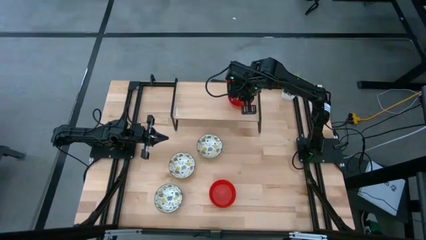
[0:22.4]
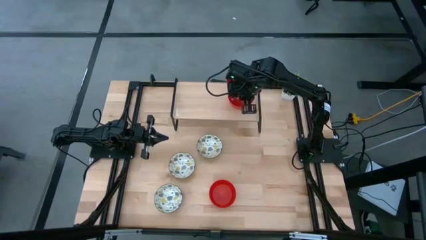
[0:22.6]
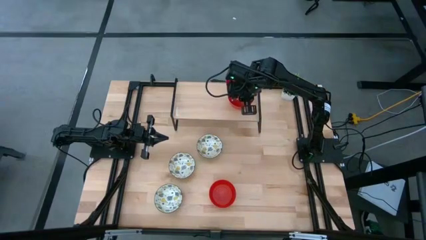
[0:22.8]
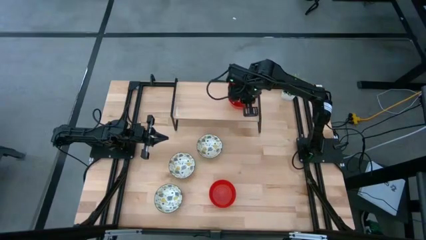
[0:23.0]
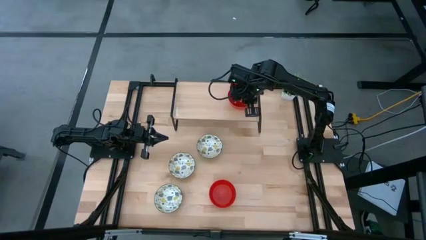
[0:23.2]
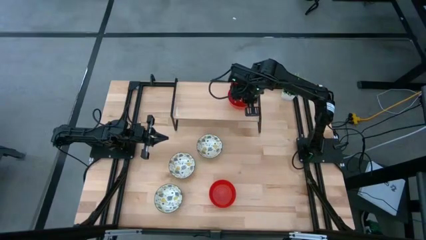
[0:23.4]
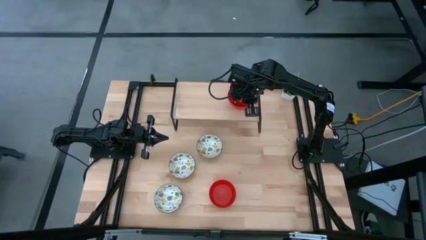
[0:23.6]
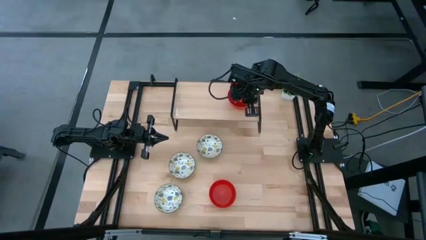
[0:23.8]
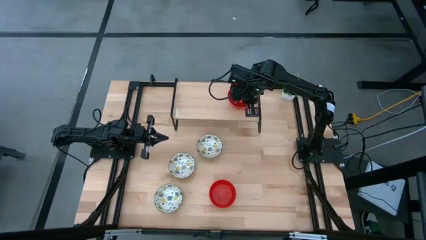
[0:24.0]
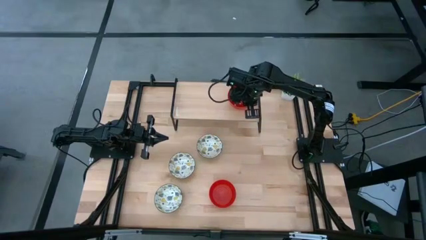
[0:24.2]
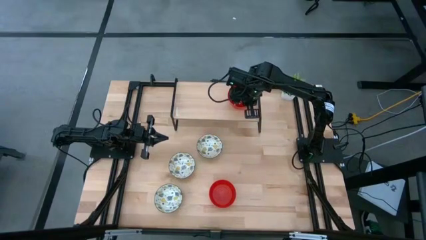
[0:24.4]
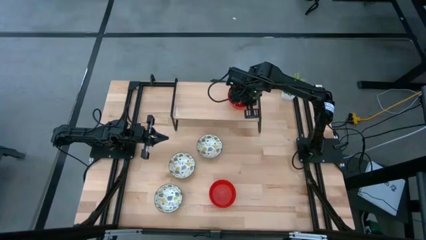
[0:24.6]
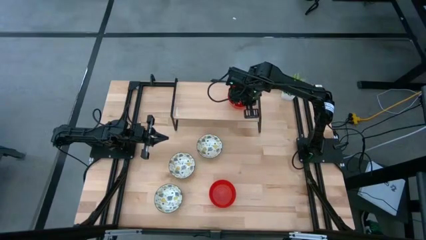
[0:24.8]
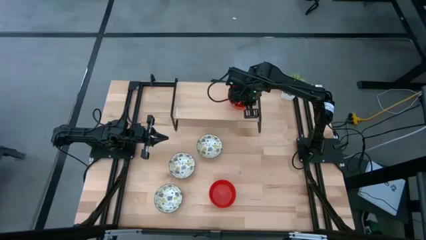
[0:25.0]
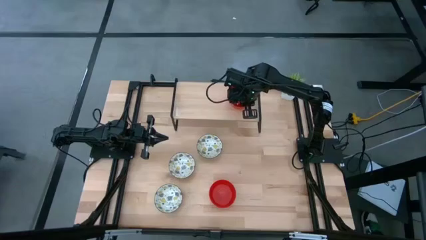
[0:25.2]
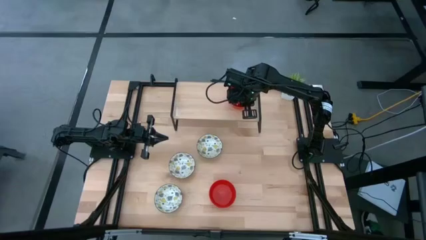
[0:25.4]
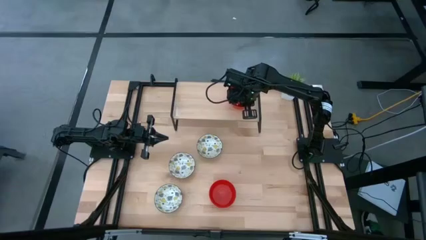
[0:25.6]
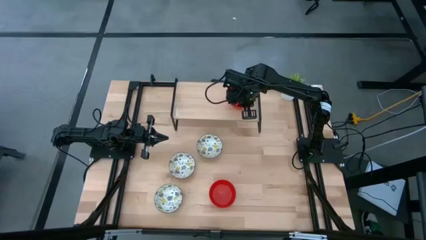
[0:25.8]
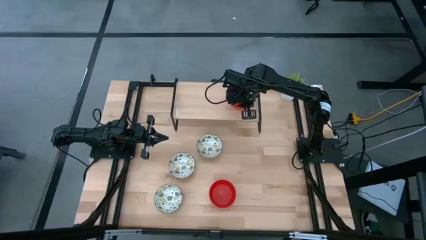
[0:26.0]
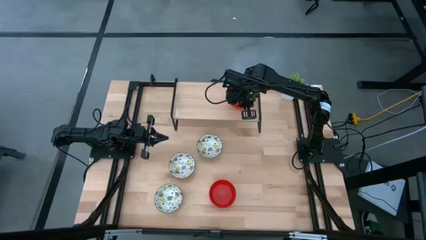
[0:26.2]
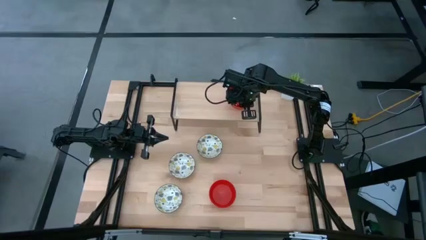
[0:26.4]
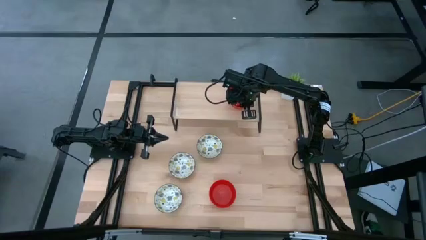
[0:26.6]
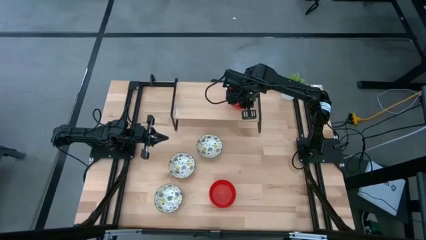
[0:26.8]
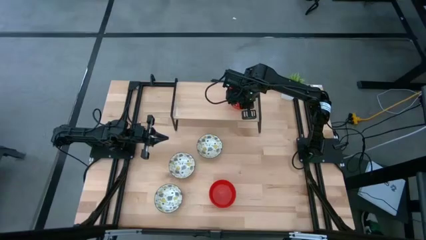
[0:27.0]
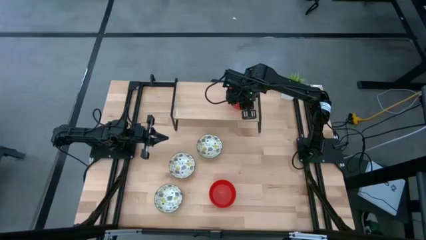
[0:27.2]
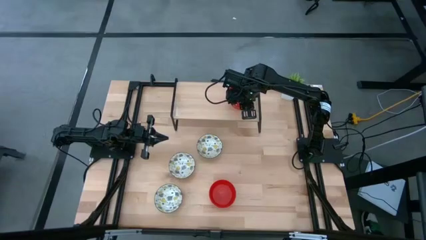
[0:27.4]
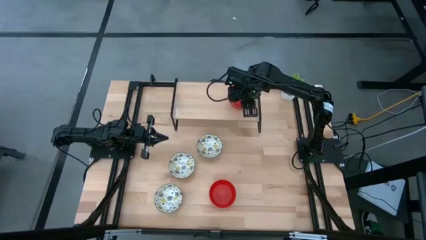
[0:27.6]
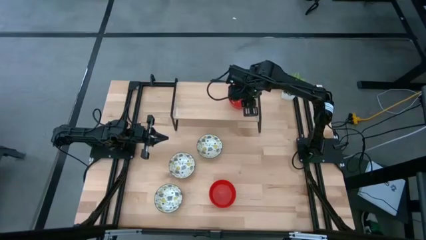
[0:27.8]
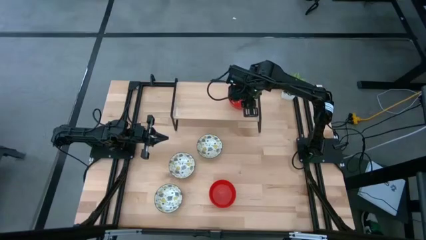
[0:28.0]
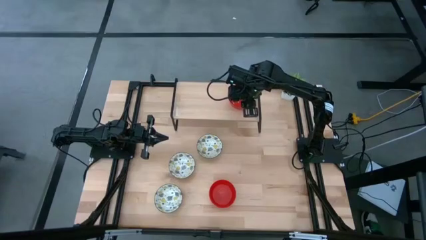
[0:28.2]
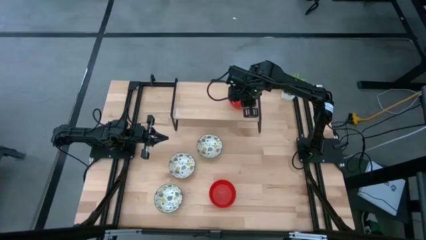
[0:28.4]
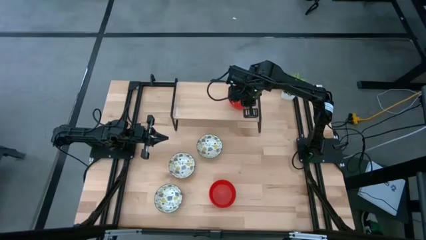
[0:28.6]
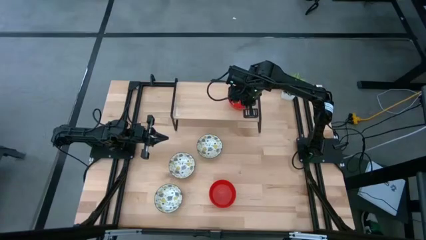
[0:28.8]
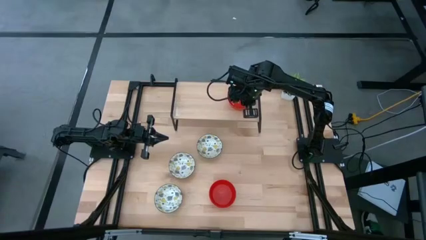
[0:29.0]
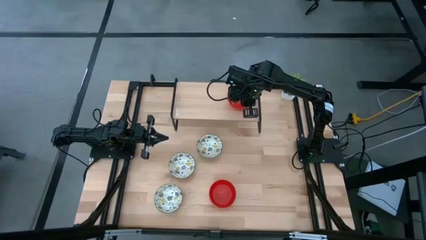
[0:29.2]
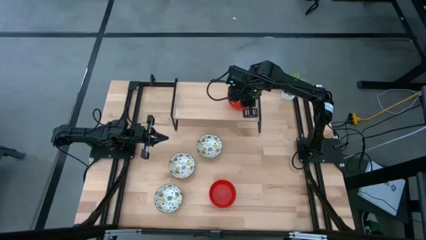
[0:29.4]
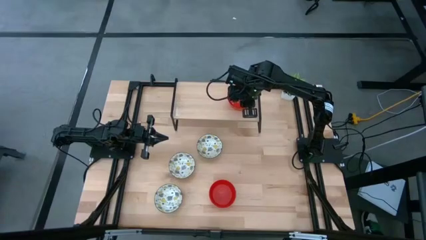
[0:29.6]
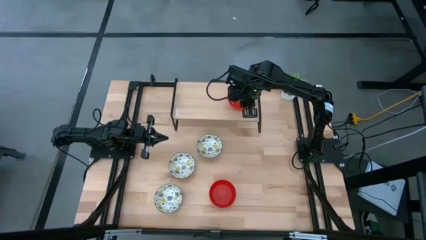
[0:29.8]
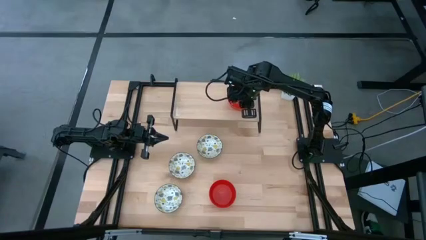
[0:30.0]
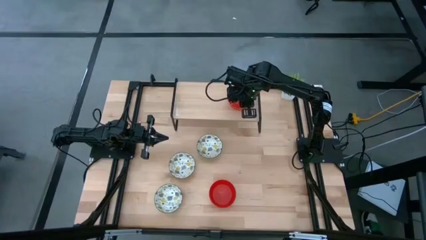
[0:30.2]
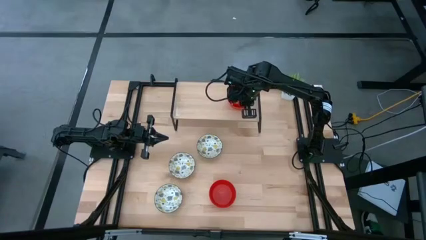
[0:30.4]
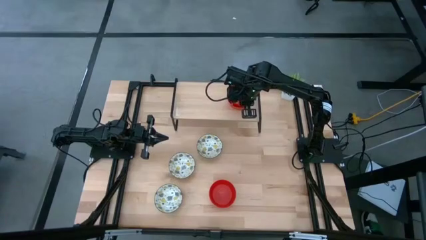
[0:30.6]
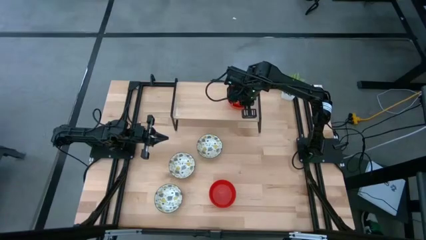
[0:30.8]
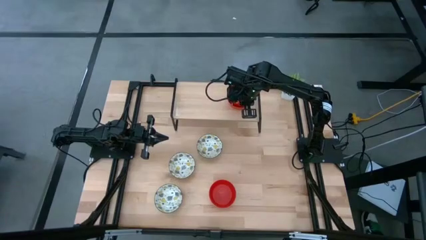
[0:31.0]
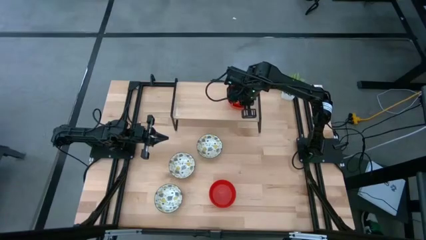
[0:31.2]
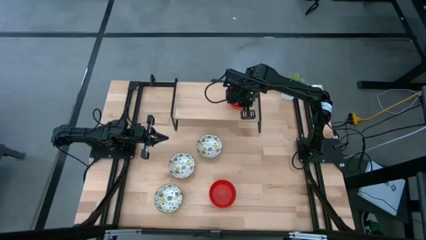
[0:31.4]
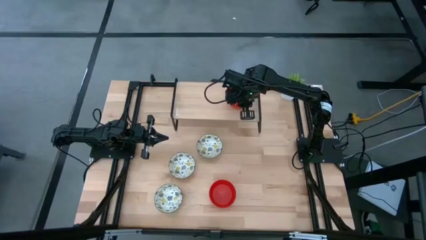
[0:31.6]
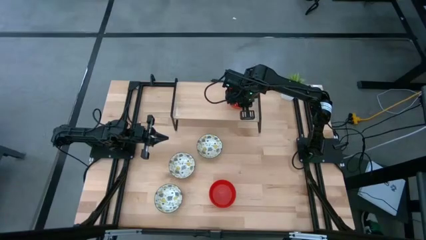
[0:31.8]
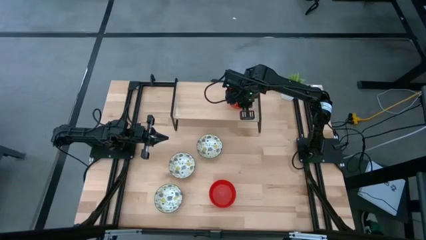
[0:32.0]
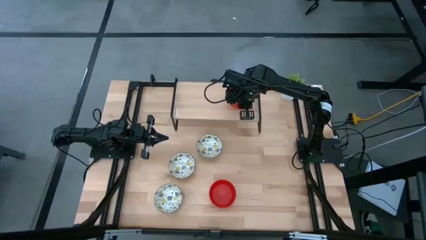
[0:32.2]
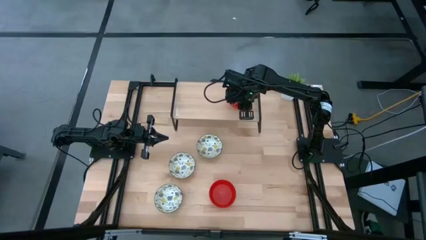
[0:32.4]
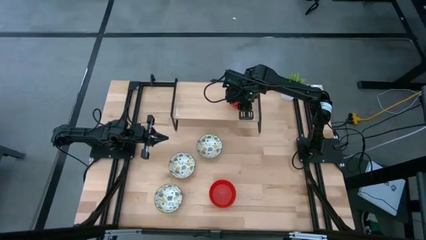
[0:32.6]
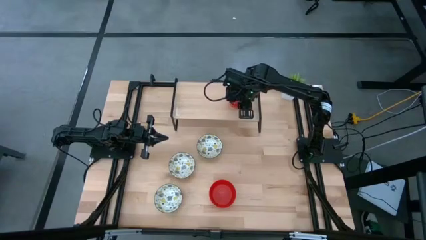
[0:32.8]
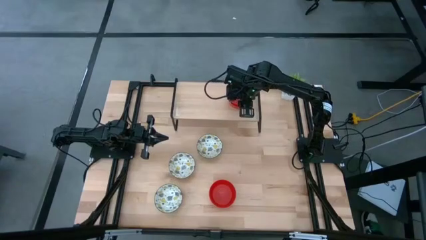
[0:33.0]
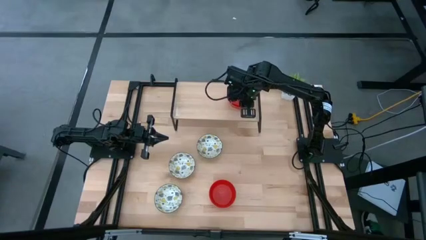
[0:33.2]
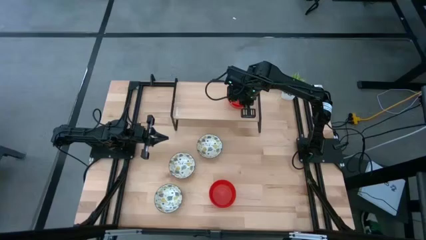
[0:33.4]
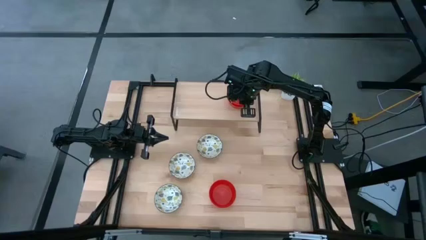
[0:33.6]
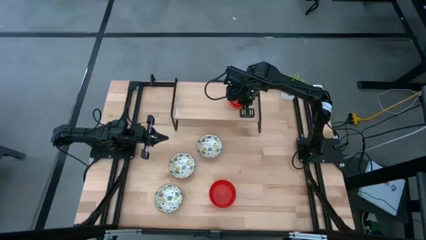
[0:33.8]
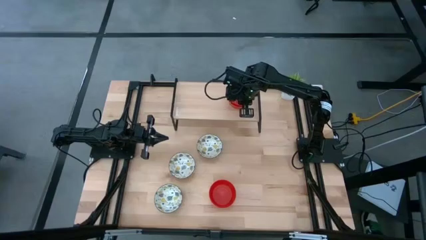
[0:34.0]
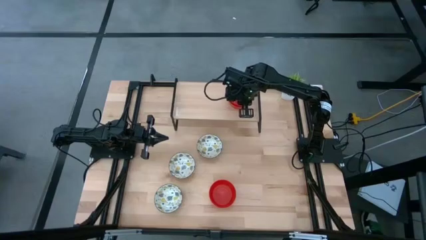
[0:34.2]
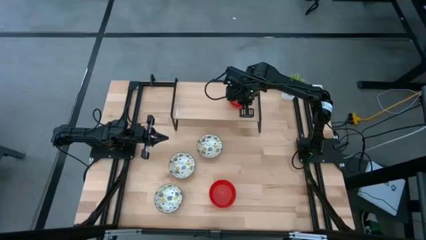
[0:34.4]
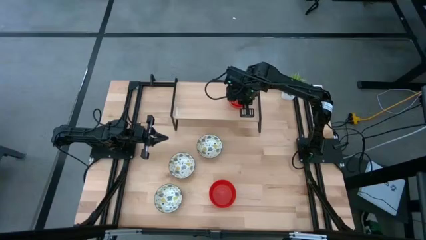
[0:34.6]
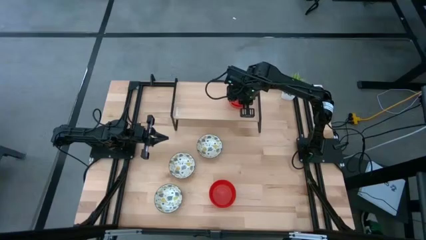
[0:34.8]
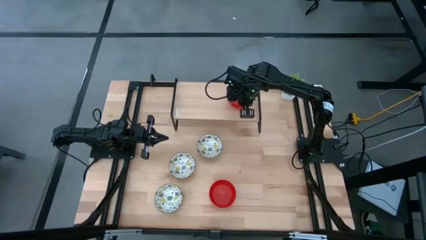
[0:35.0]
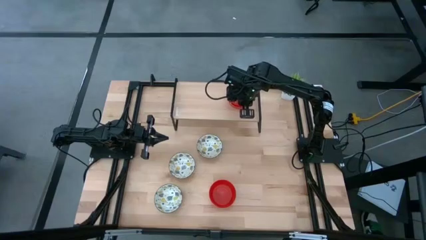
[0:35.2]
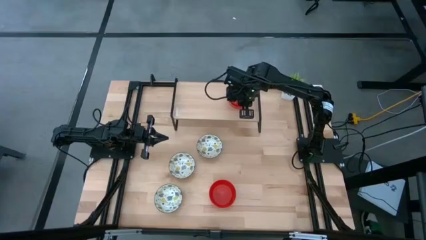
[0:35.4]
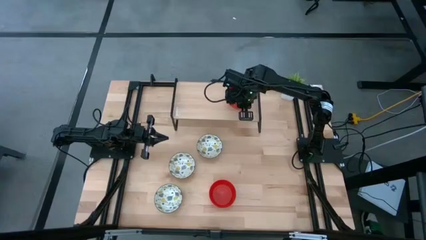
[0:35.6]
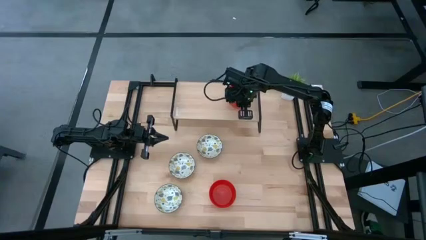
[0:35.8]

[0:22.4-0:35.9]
Task: Pick & Place Mini bowls
Stack the right red bowl on top of the red bowl on the shelf

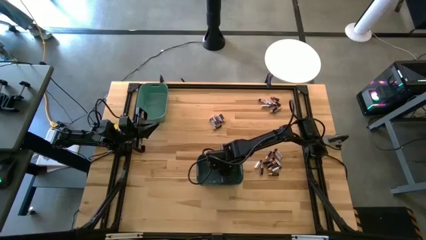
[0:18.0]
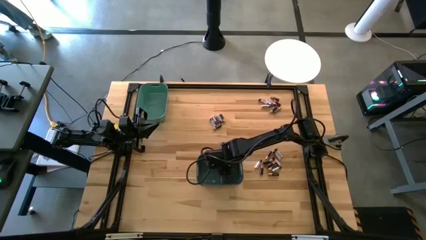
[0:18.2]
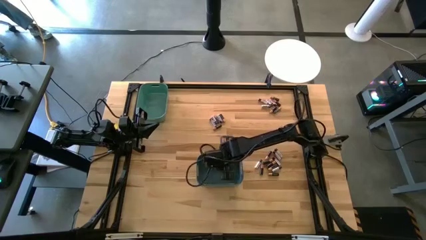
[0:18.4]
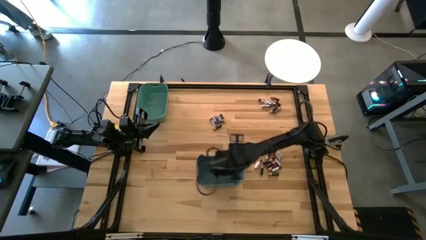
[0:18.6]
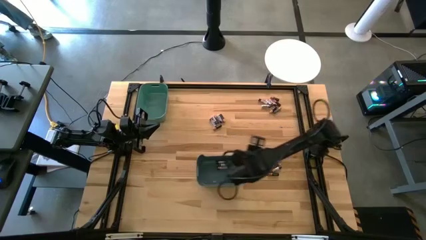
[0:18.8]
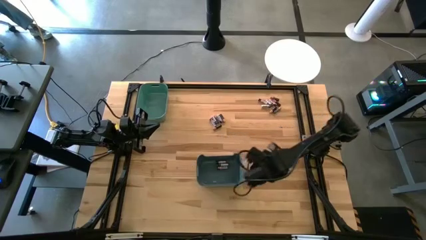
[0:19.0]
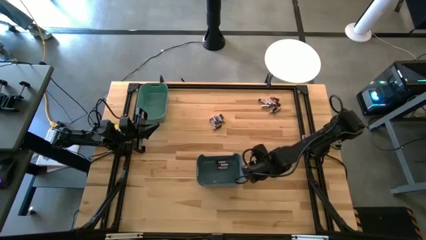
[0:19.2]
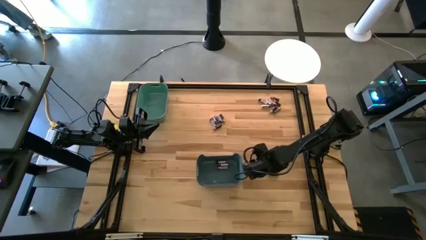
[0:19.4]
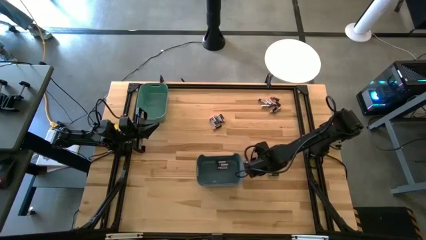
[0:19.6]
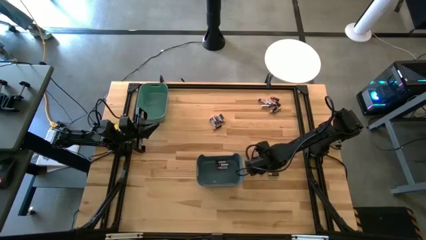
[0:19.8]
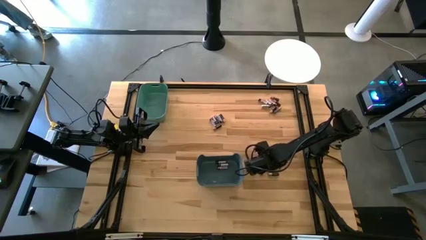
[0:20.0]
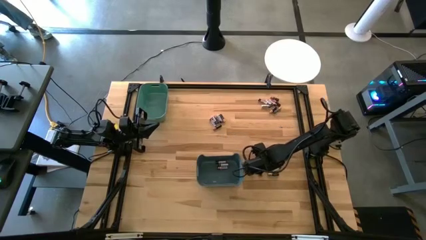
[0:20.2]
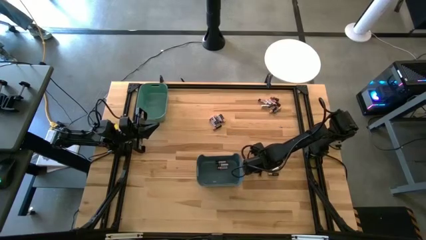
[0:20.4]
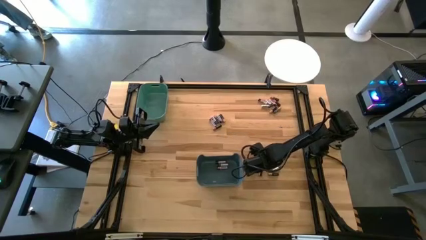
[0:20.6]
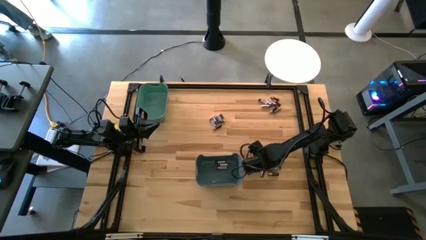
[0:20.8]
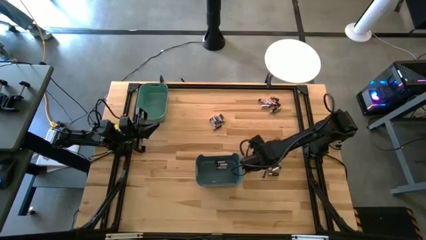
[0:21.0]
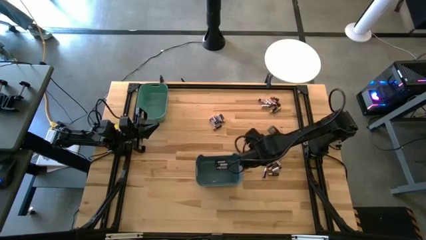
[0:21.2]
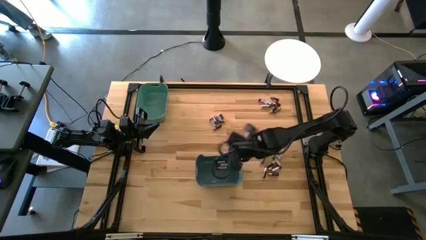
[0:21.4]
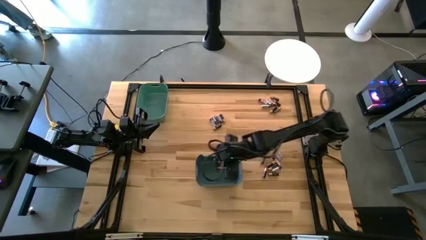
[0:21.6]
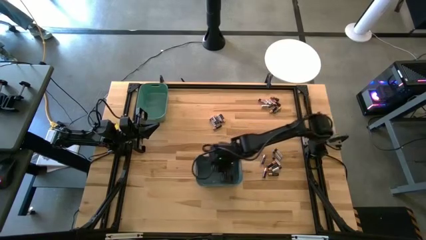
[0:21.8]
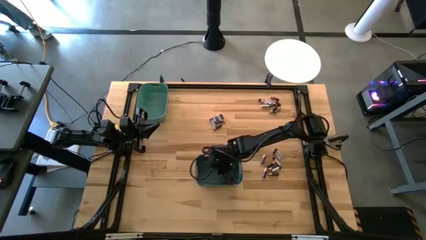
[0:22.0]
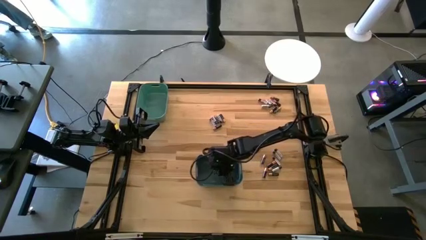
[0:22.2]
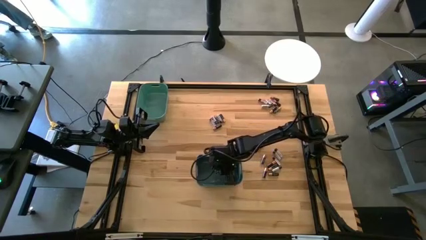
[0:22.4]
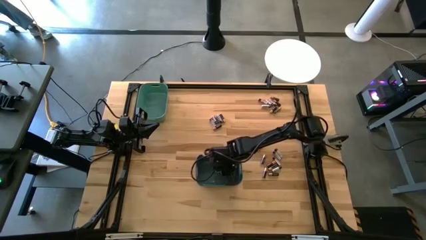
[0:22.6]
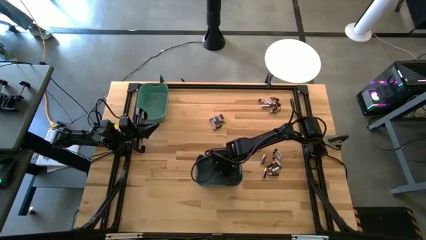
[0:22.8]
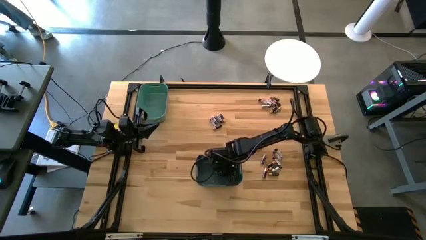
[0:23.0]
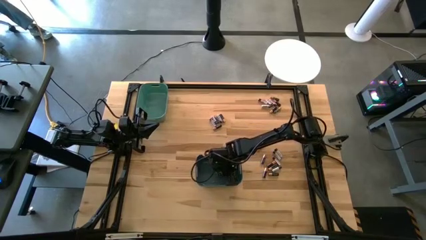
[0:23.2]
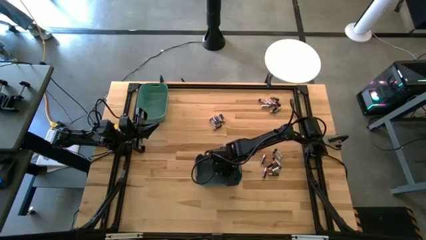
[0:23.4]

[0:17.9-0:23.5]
Task: Sort batteries
Put the silver battery into the blue bin
